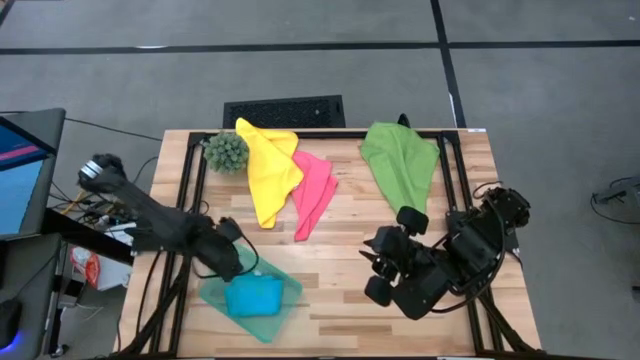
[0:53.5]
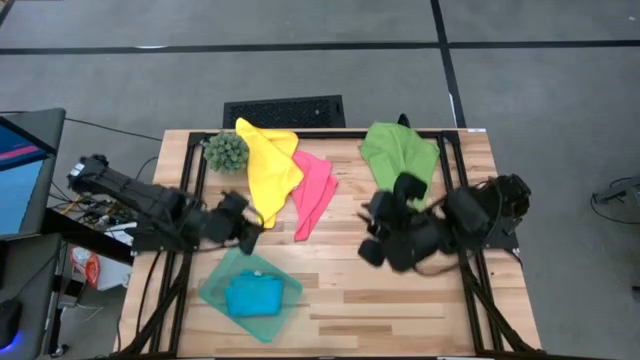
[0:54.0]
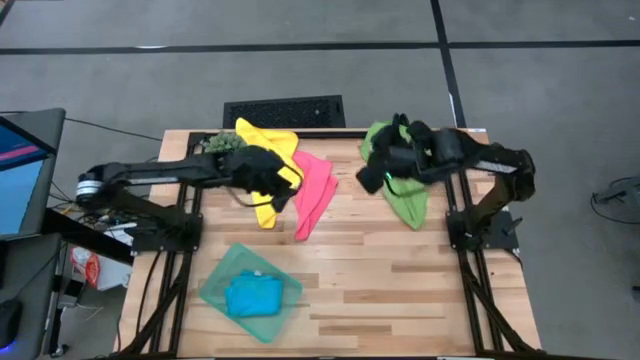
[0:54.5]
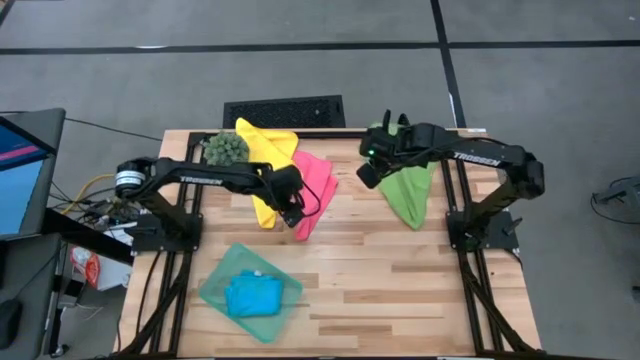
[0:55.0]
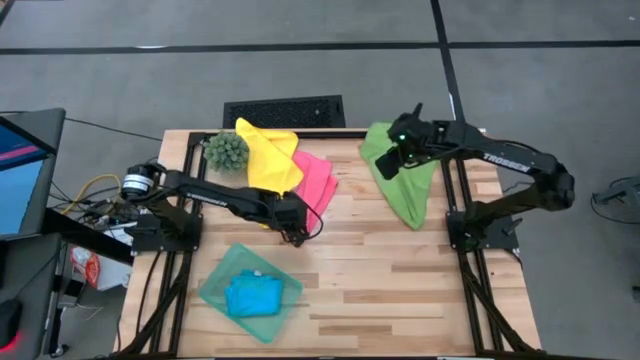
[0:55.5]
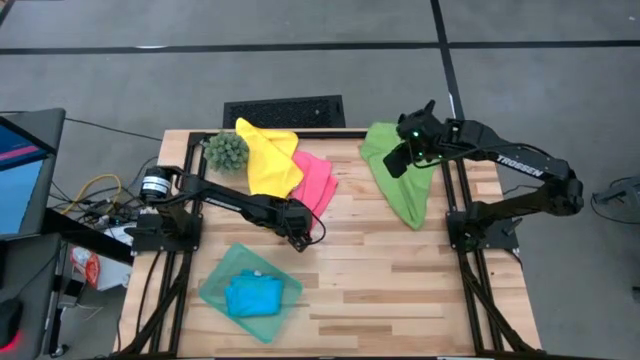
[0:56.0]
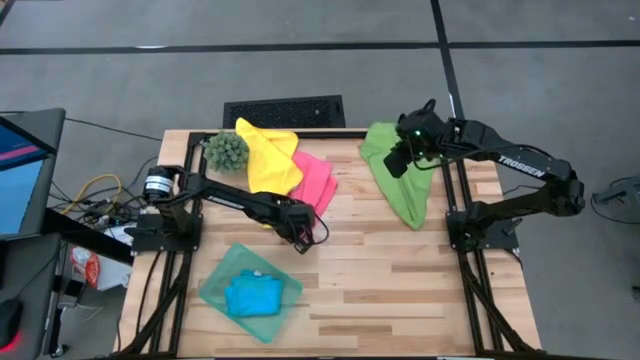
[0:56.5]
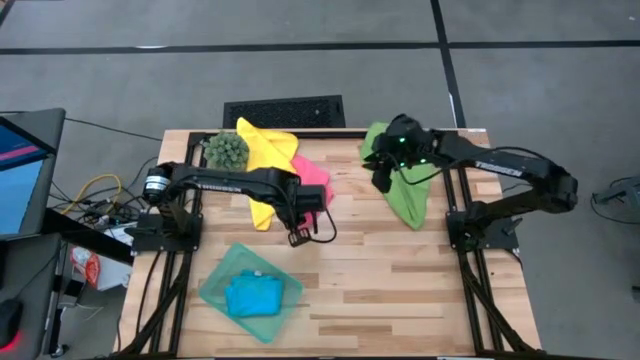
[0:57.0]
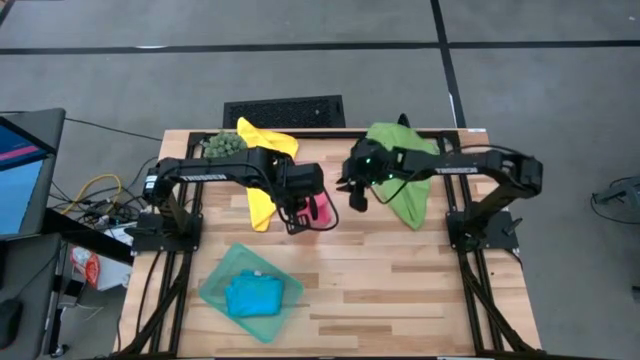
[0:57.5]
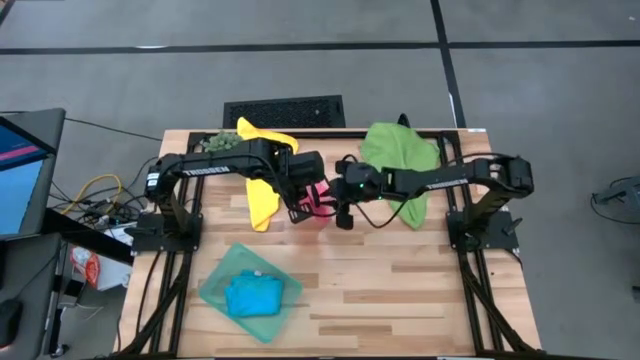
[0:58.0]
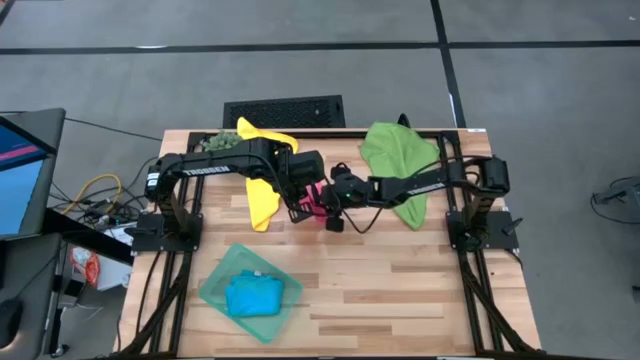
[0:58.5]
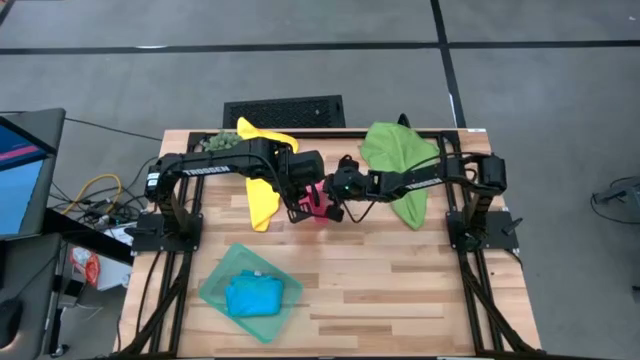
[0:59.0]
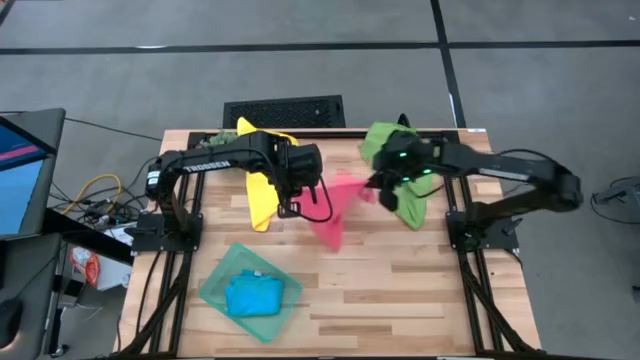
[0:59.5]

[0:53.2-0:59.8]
Task: Fold microfiber towels
Fold the pink microfiber towel

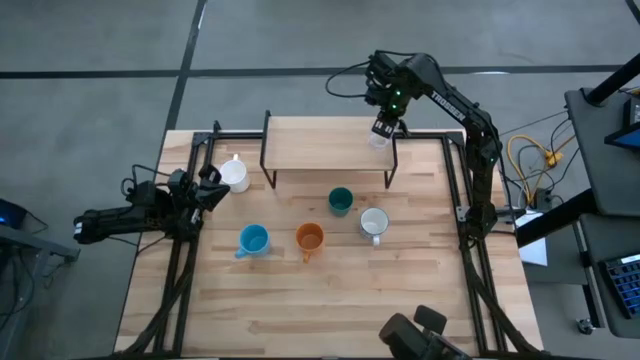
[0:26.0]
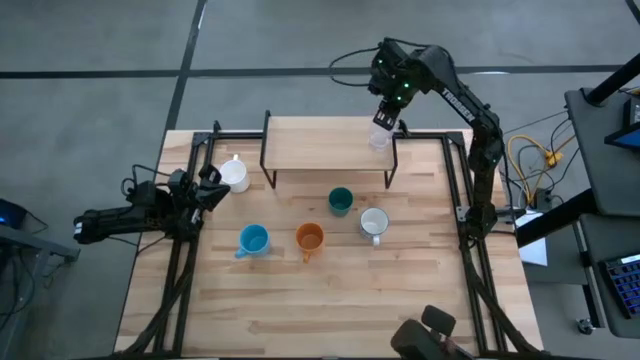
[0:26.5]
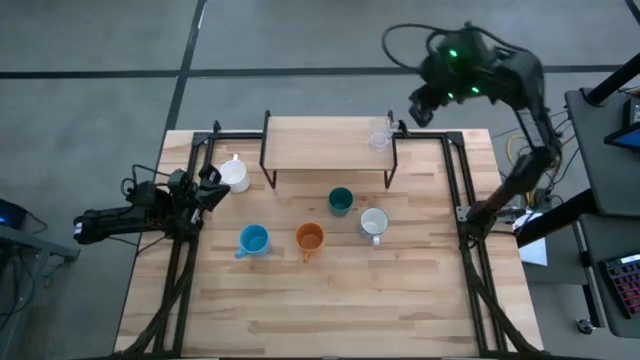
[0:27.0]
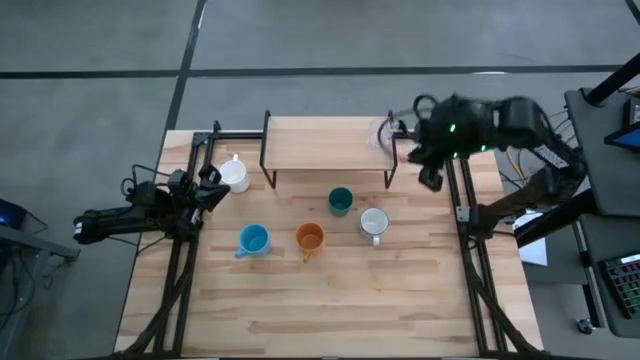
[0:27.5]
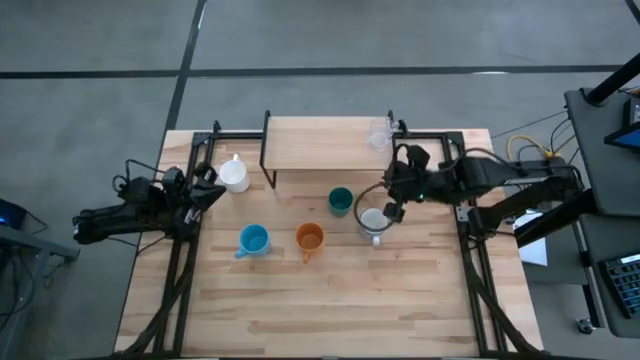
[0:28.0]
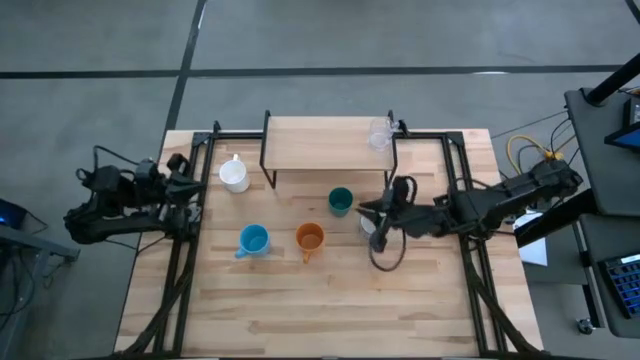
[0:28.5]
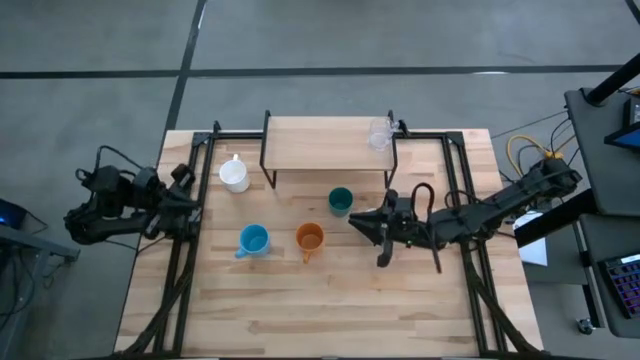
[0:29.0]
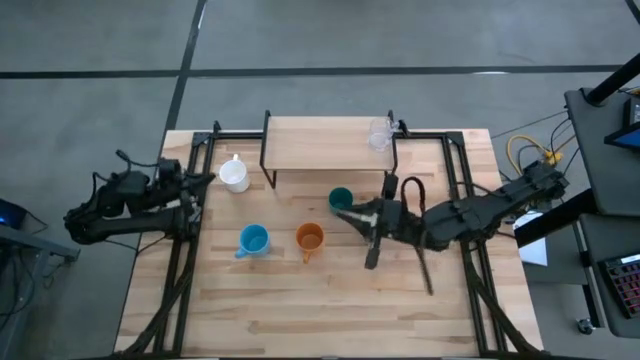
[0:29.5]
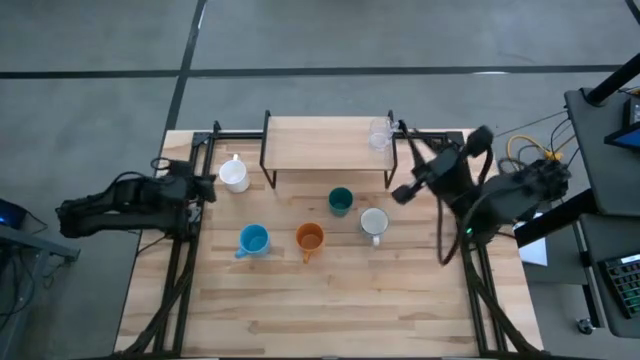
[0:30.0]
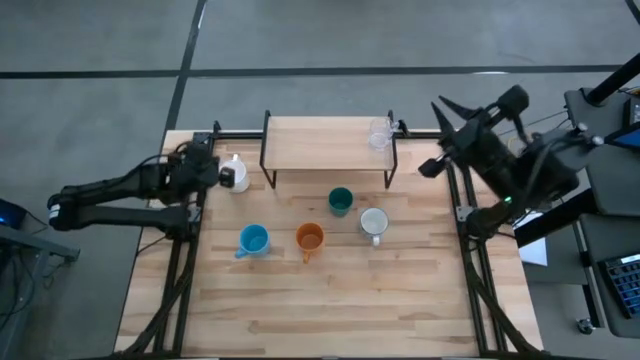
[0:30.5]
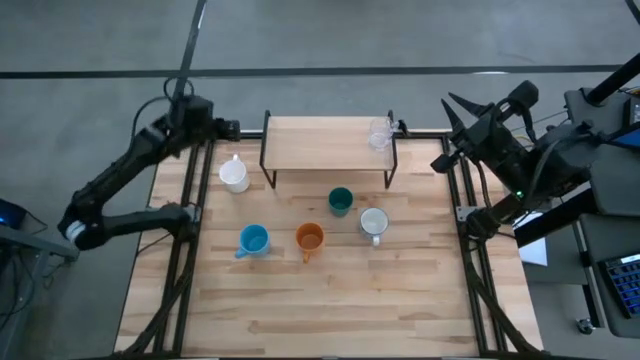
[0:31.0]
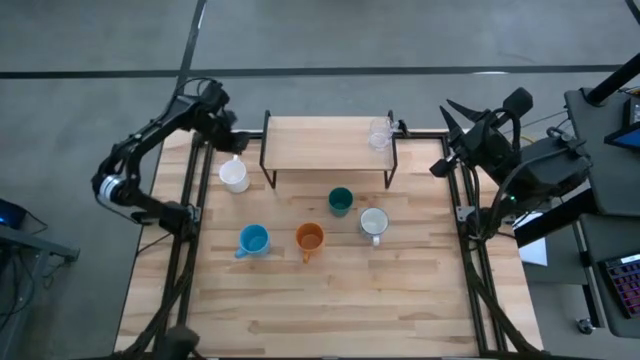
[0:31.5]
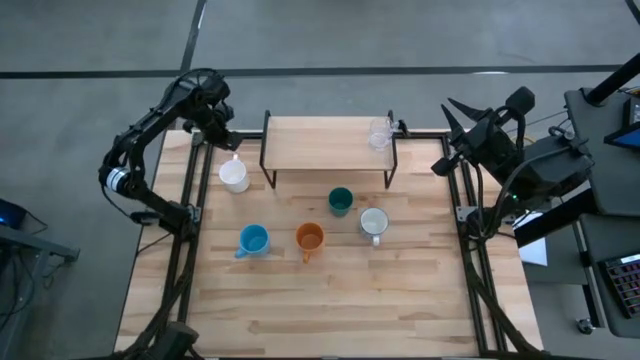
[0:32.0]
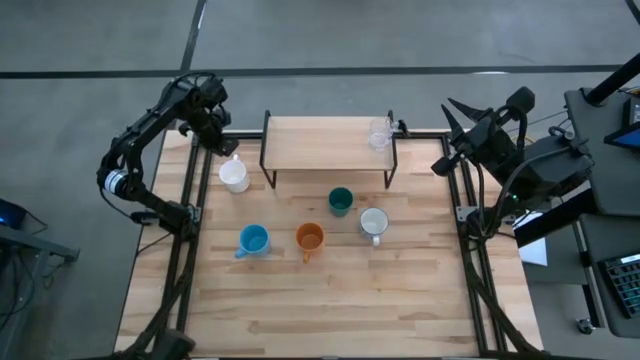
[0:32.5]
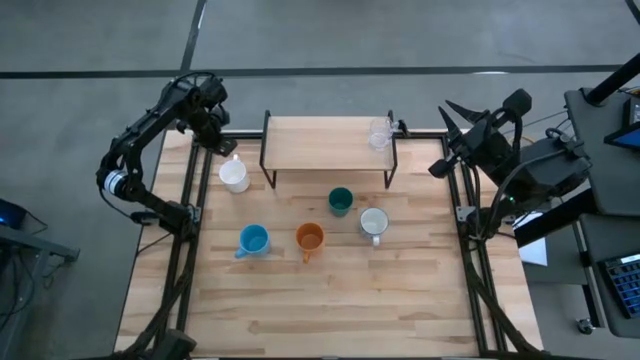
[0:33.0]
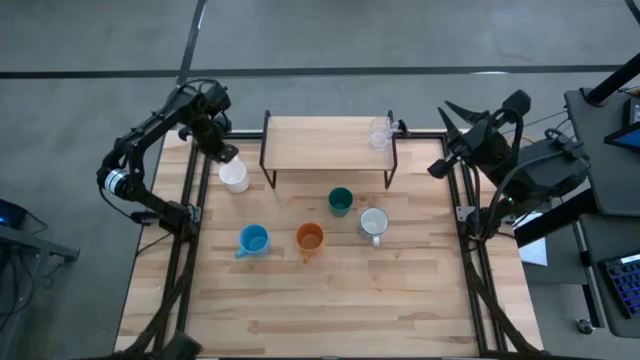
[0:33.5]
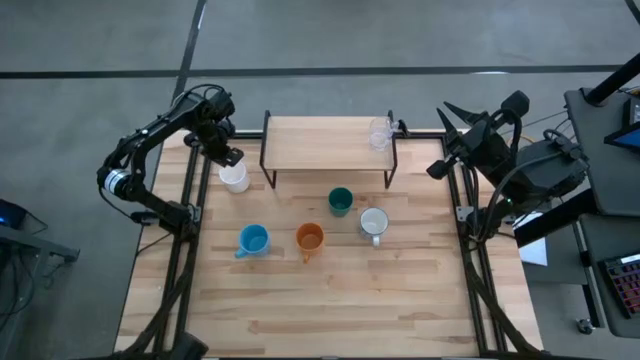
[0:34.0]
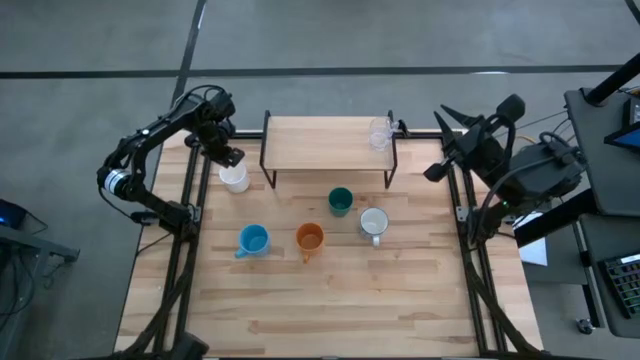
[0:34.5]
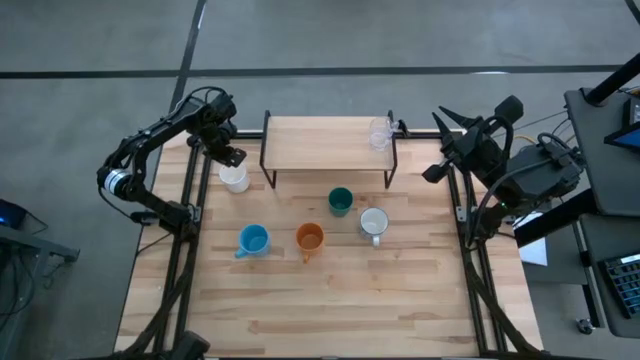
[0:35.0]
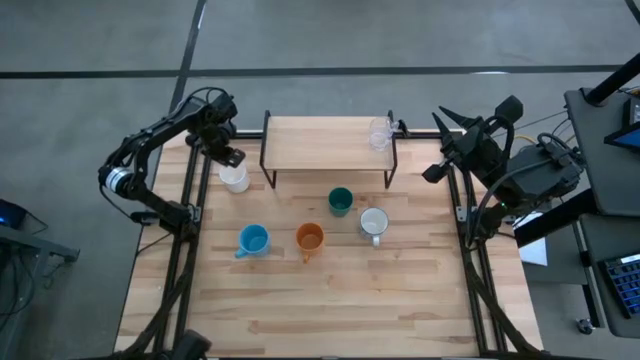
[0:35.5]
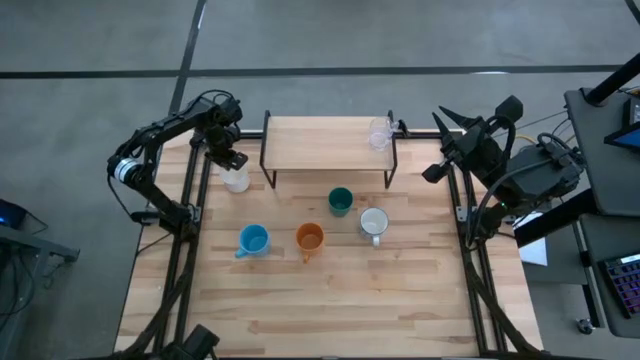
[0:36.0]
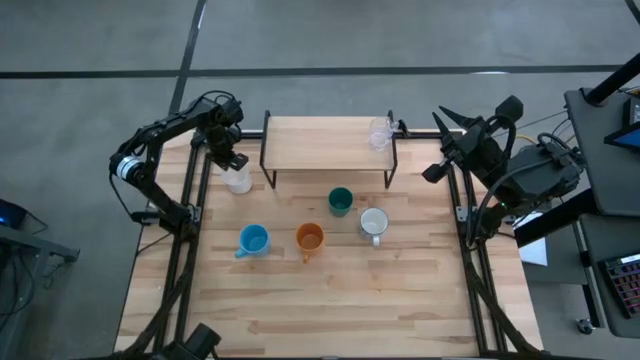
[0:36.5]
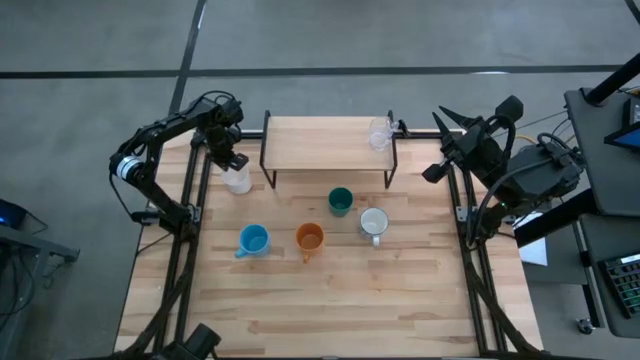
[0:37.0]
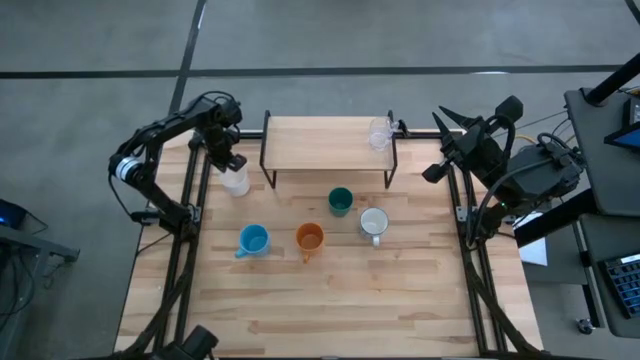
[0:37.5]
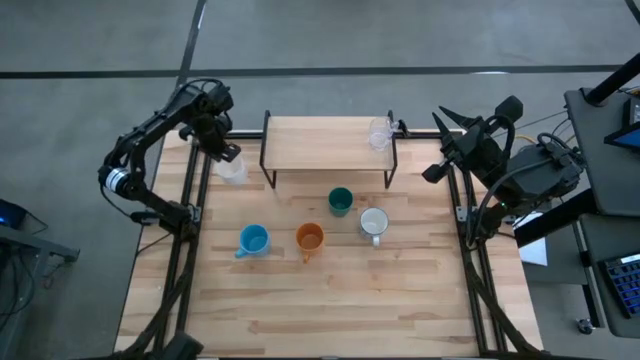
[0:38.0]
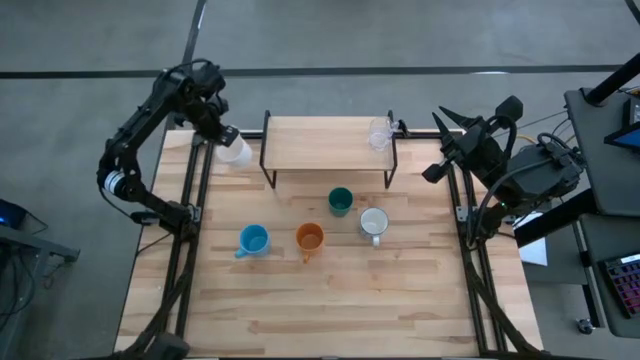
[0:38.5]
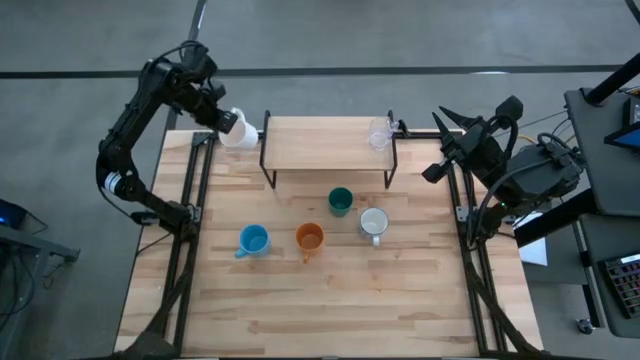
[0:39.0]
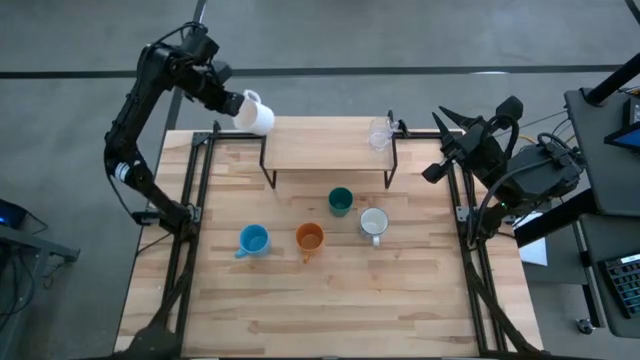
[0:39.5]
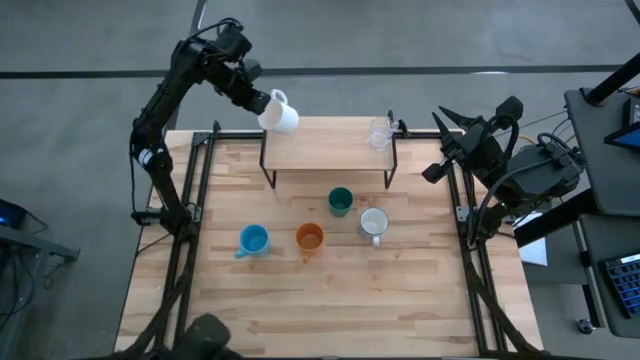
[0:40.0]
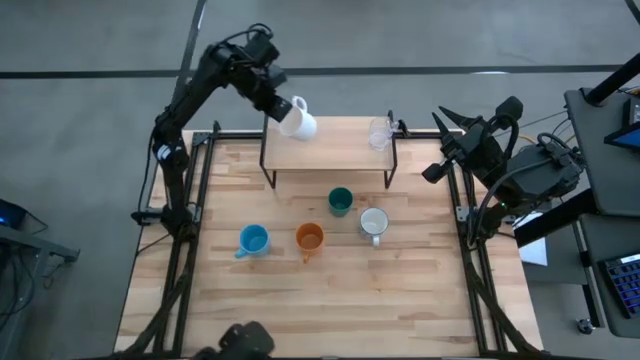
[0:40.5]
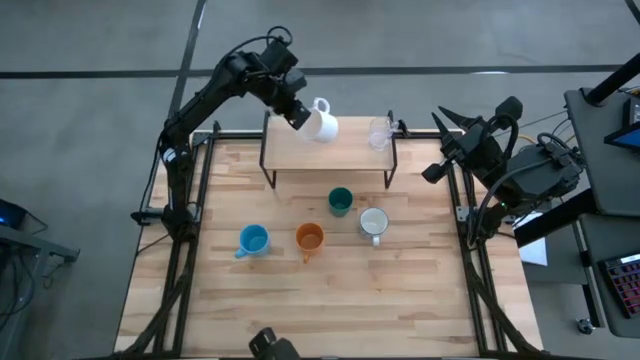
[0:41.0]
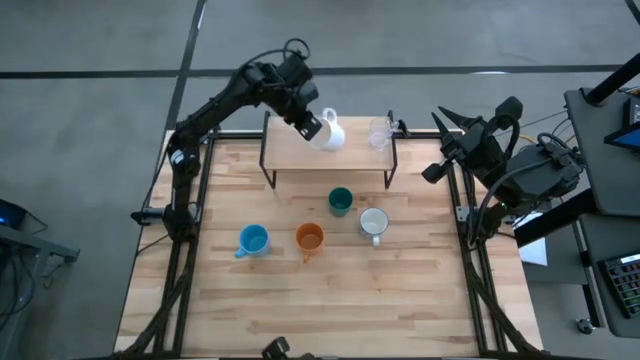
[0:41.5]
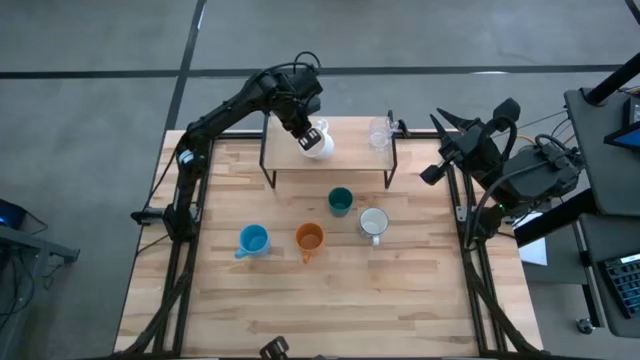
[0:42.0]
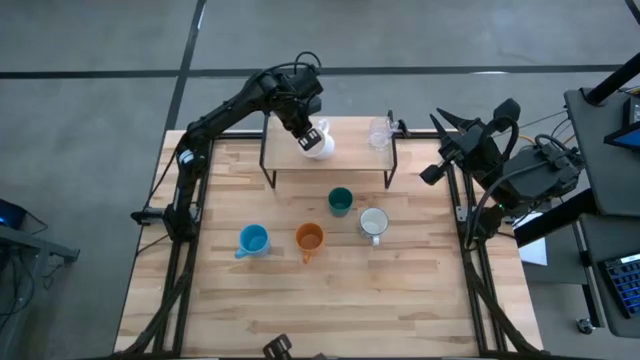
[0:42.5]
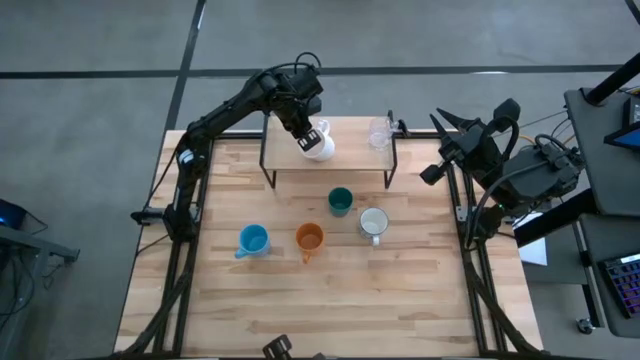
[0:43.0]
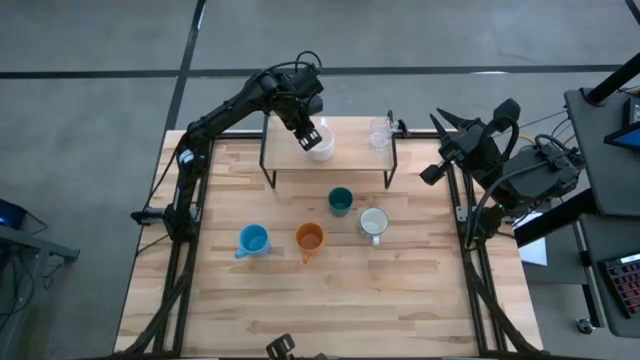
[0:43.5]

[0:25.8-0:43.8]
Task: Stack small to large cups/mugs on shelf
Put the white mug on the shelf
